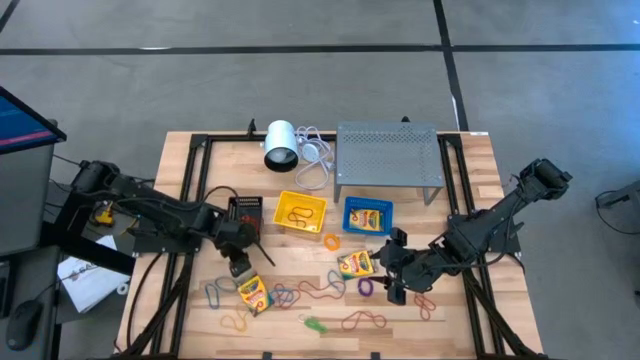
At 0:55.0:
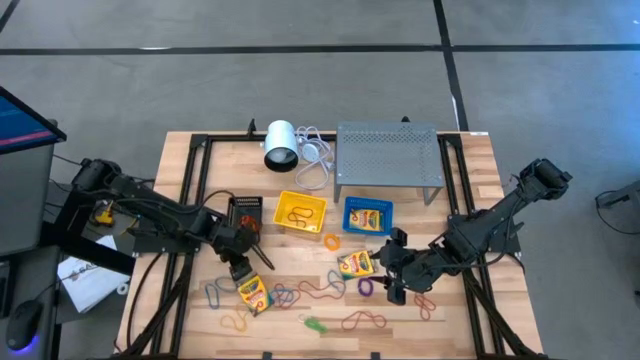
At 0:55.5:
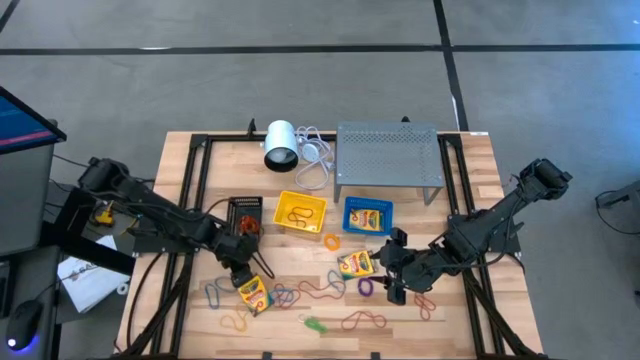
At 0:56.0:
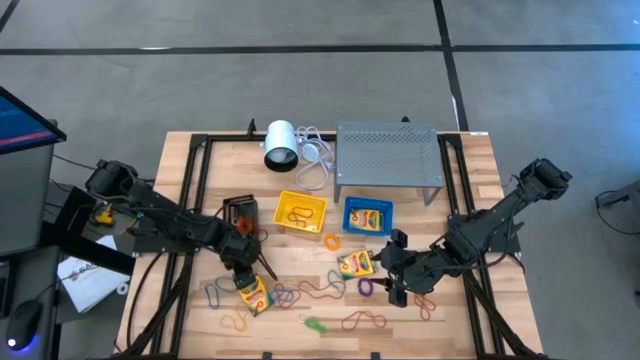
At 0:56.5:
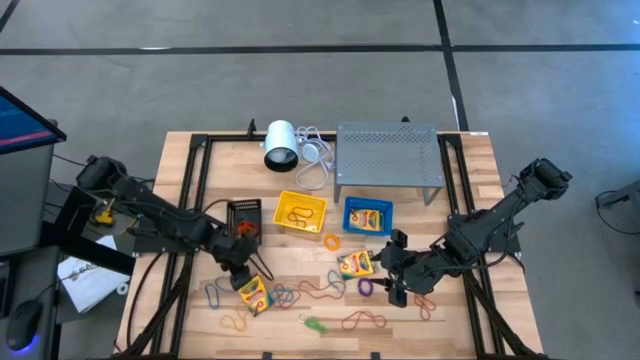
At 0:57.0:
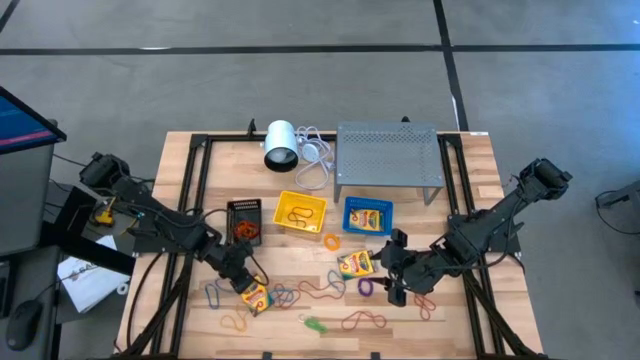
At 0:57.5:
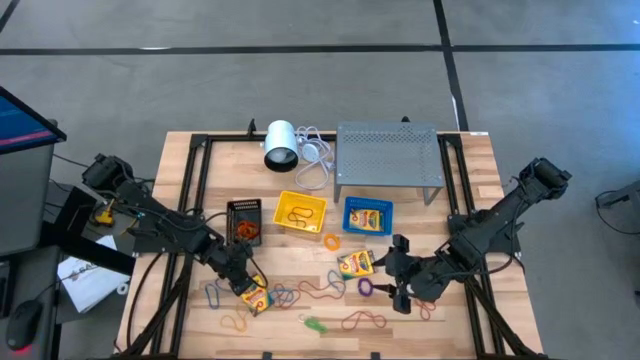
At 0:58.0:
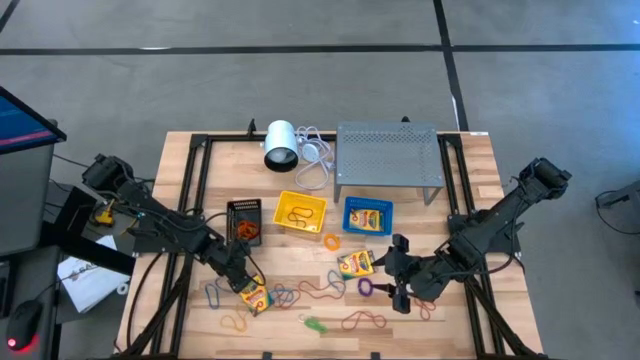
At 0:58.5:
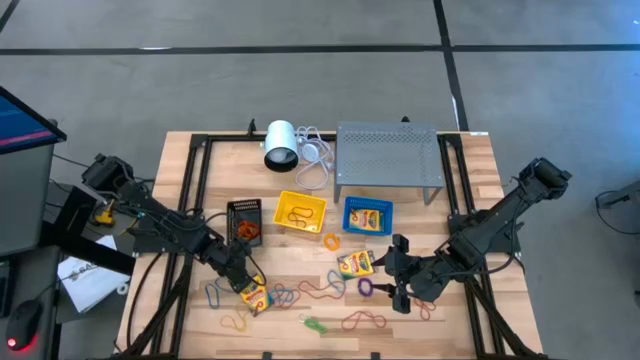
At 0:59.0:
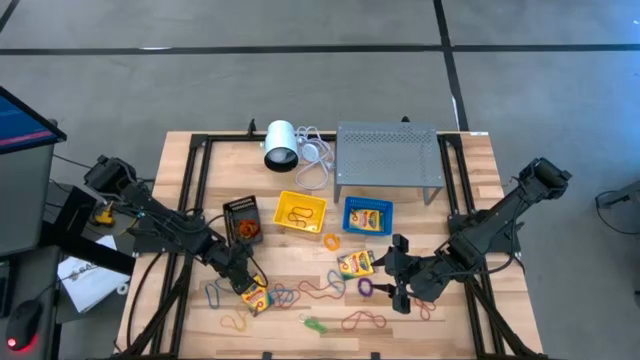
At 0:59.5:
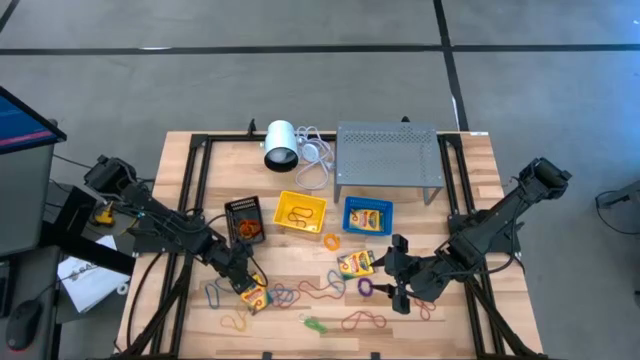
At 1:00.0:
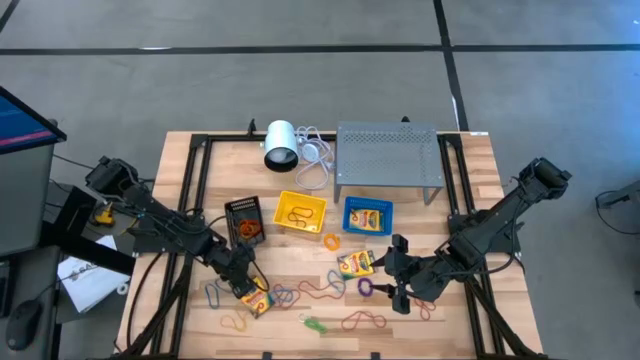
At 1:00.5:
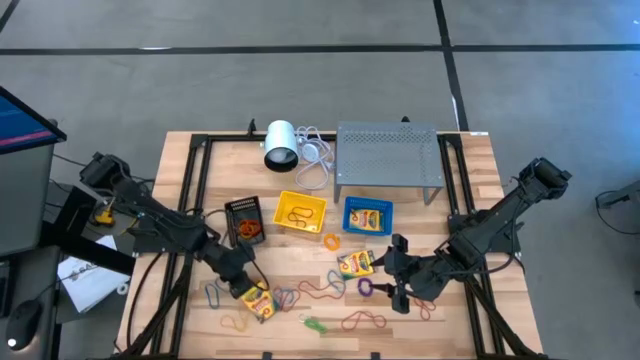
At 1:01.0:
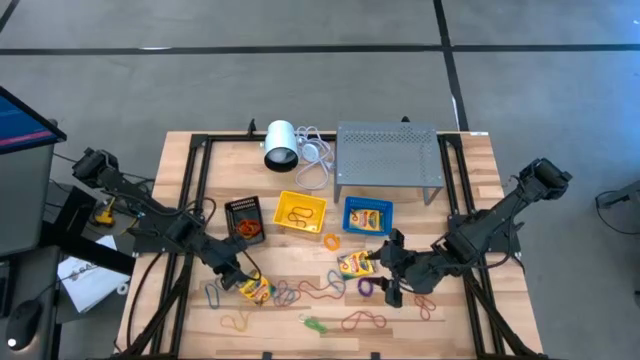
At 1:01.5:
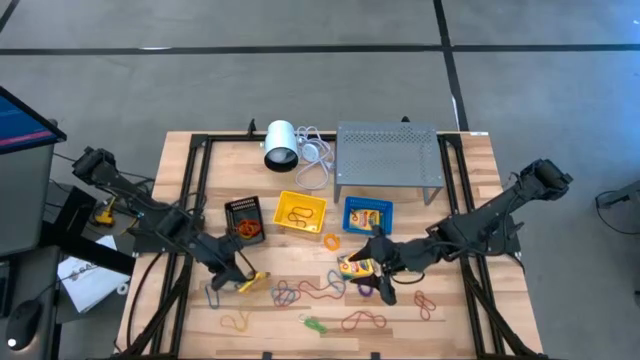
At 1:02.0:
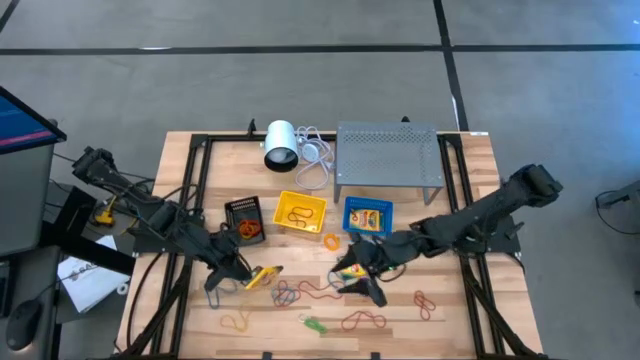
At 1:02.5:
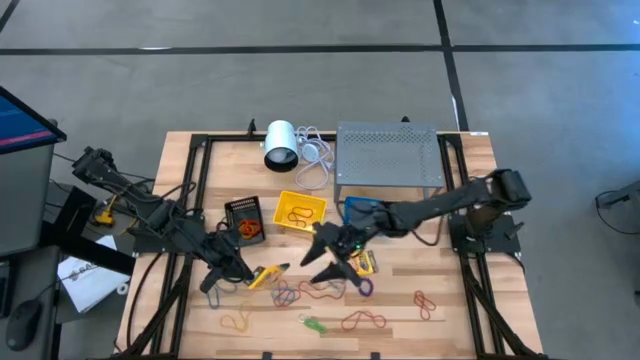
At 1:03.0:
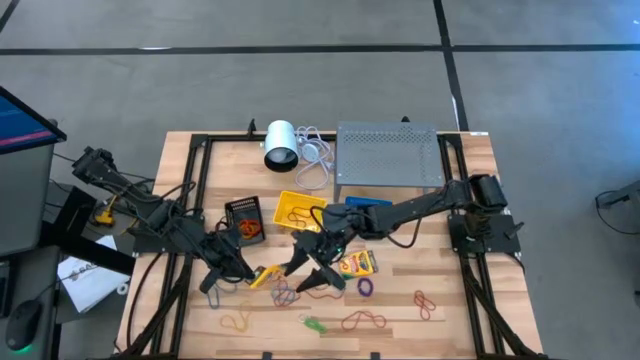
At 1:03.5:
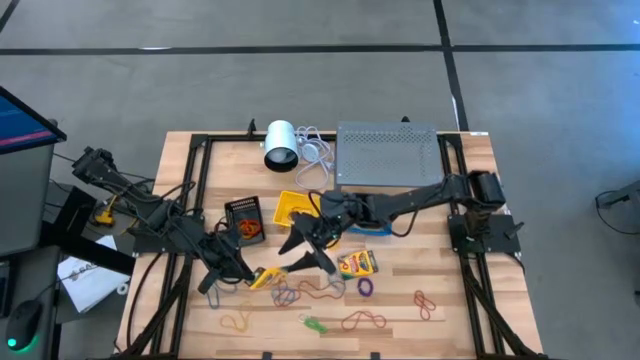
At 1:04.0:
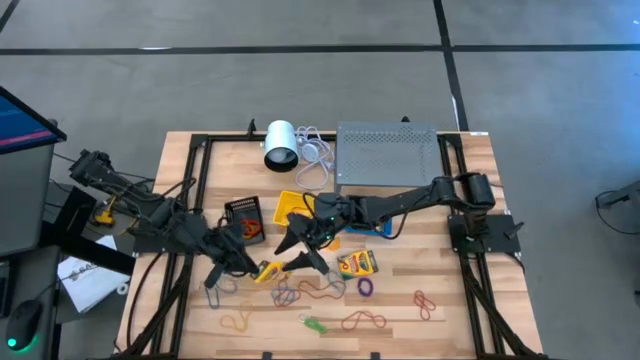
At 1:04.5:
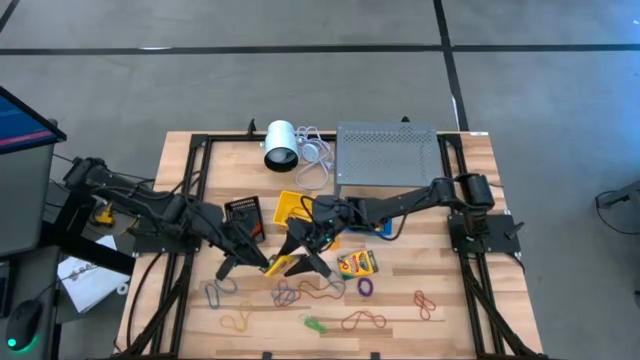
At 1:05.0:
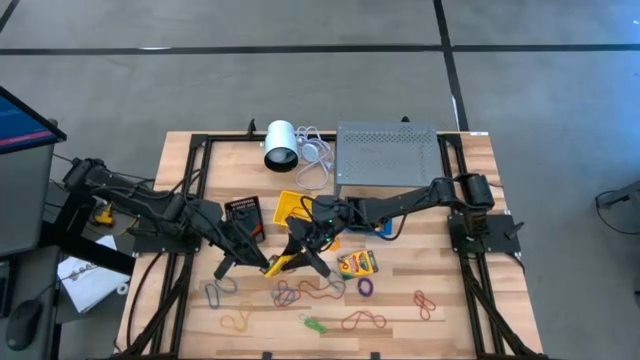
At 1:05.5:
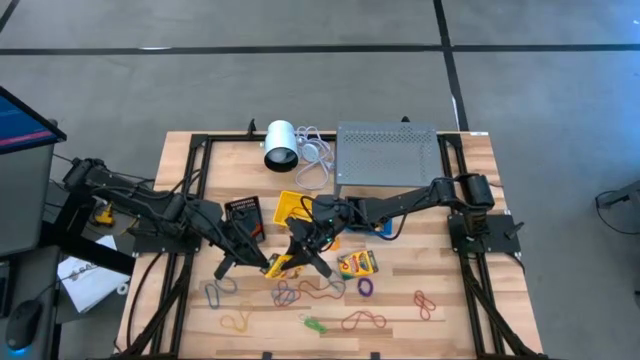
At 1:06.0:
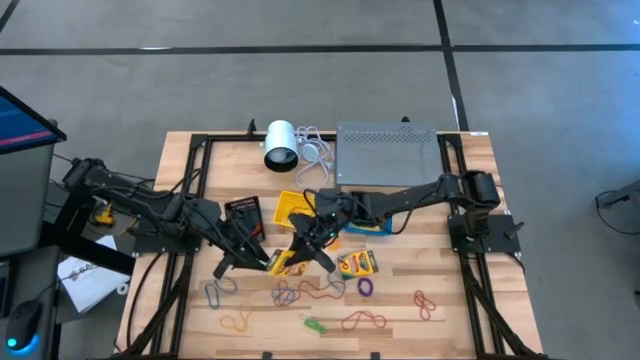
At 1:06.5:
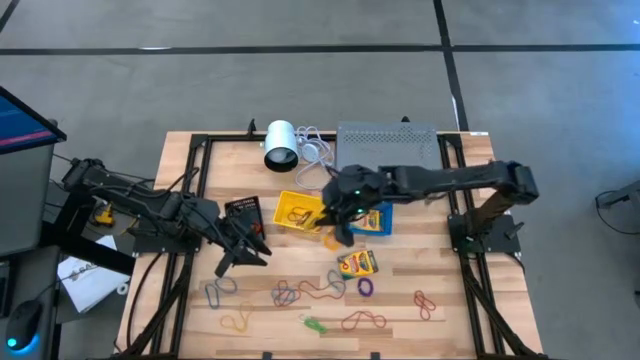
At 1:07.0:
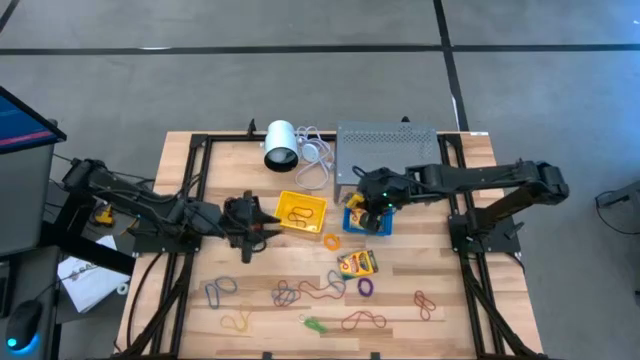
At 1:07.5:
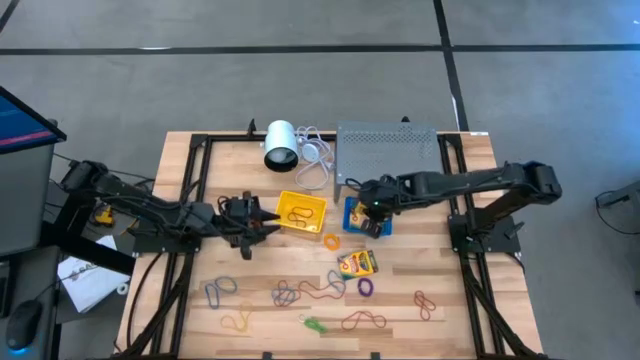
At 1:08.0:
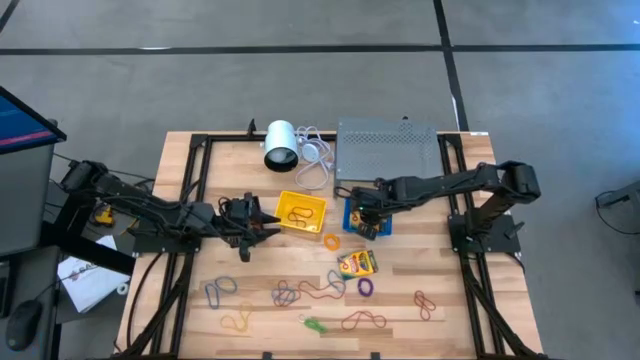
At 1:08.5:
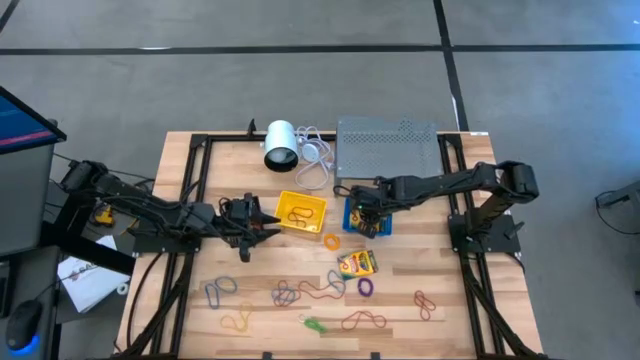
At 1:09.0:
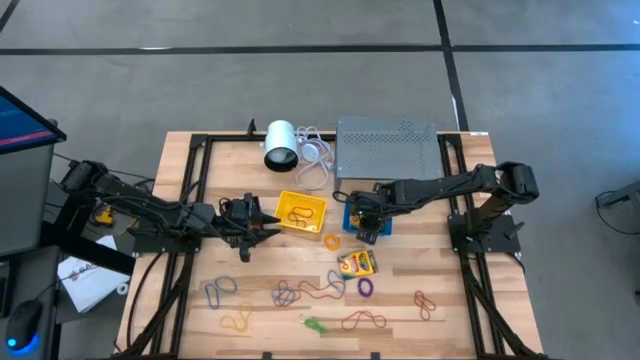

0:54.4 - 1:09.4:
Task: Pick & Place Office Desk Supplies
Put the right crayon box into the blue bin

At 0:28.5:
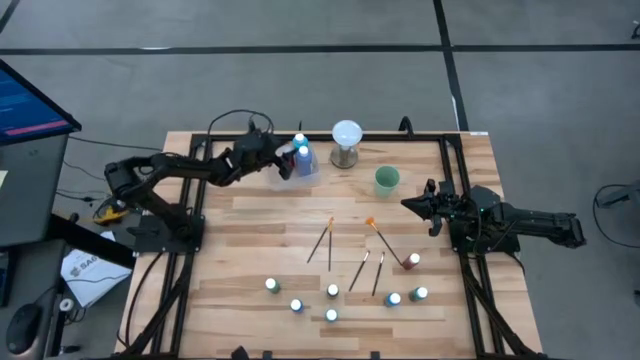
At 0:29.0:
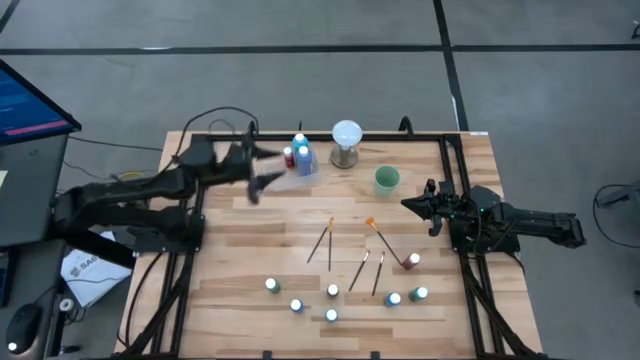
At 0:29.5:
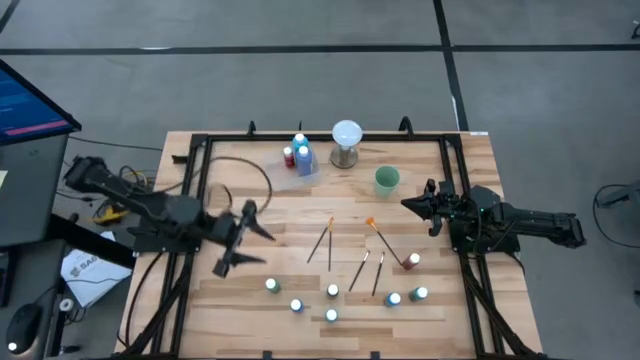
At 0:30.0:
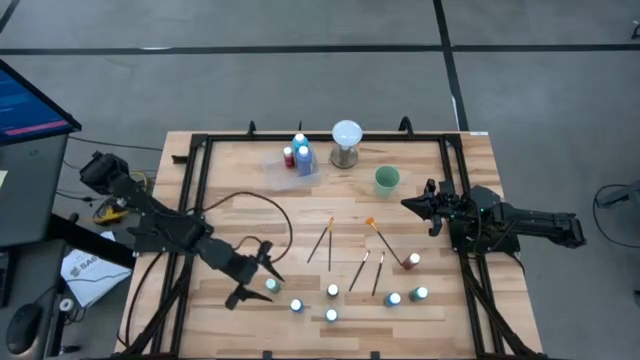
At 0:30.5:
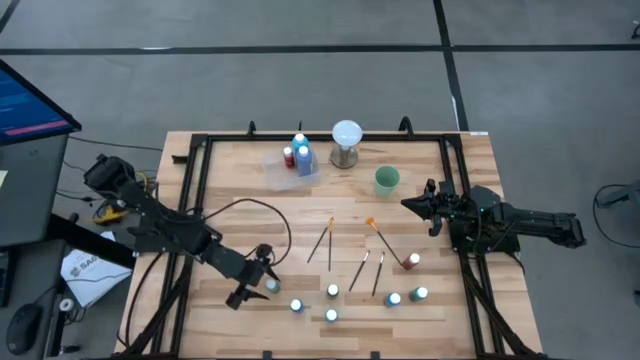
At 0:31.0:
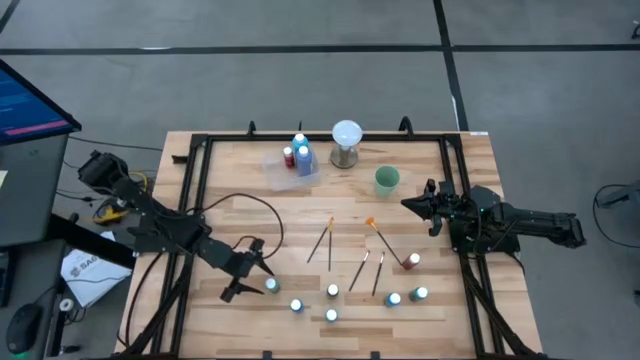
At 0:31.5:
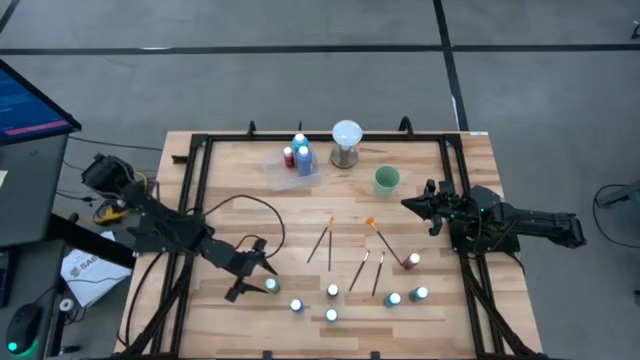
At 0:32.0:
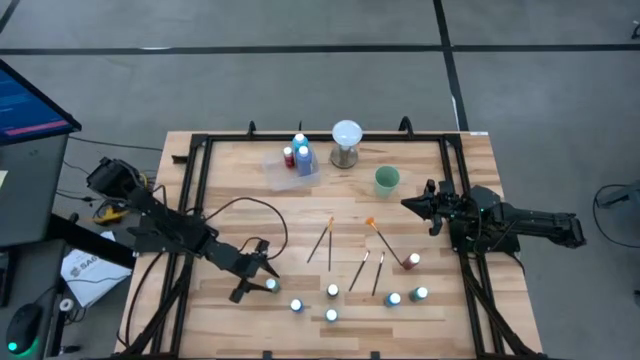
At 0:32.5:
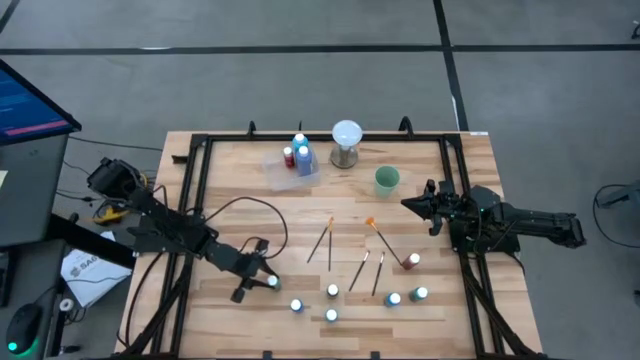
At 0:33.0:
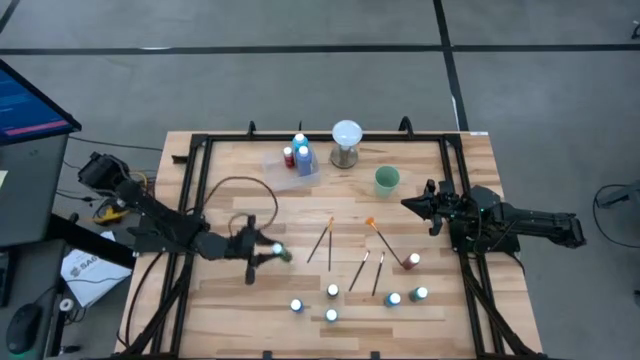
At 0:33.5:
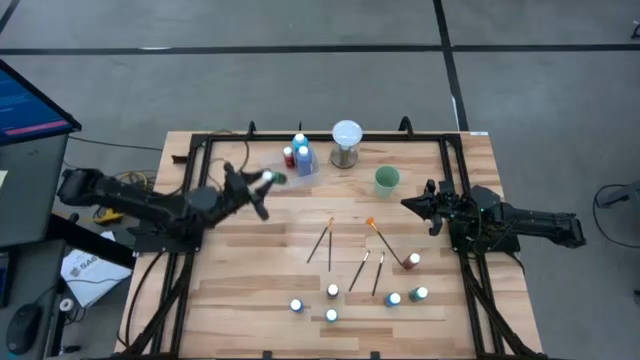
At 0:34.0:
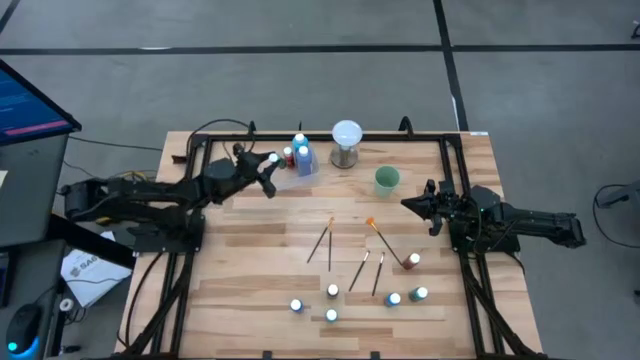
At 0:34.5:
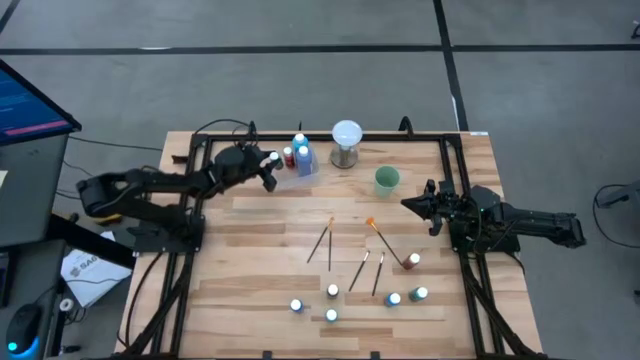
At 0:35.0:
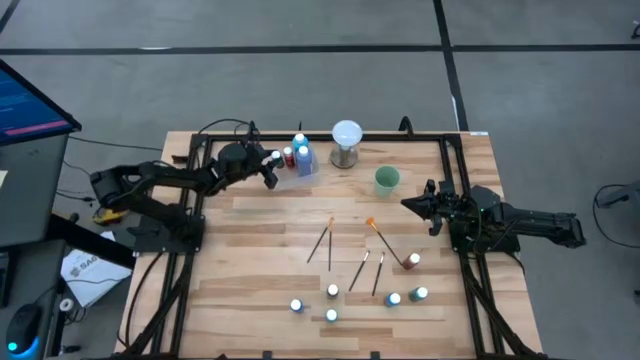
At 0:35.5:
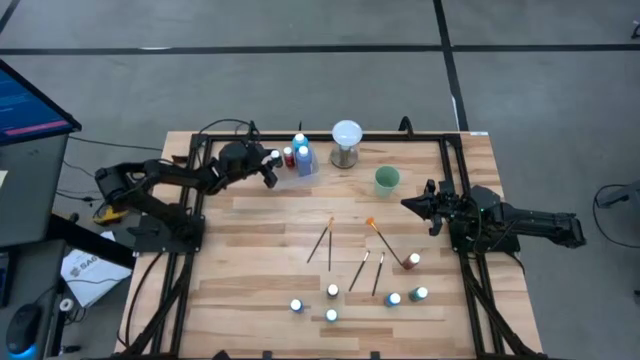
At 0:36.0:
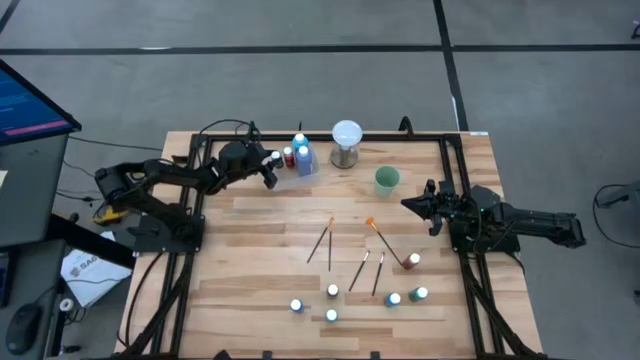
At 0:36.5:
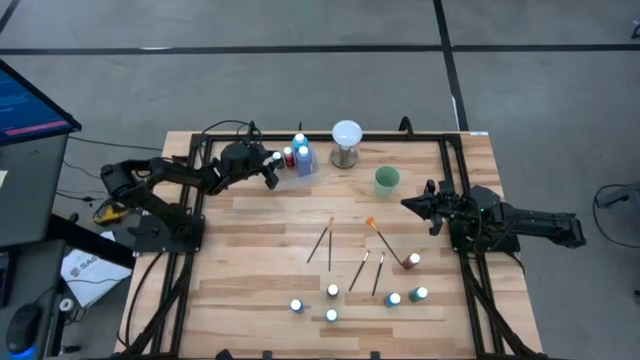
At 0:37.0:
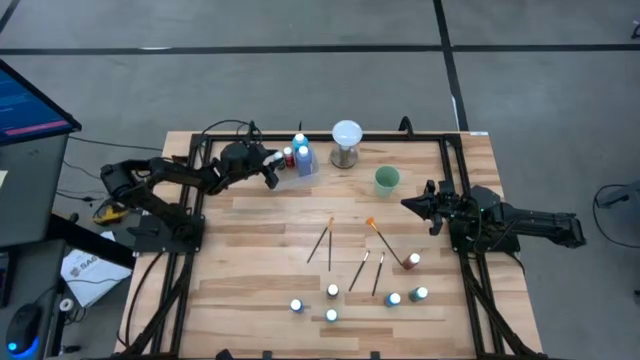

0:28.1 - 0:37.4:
Task: Pick & Place Paint Supplies
Put the small green paint bottle into the transparent bin
